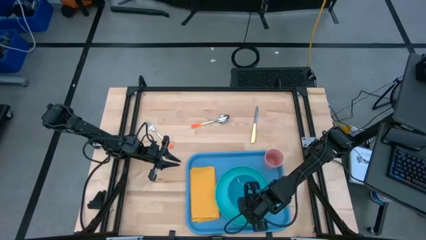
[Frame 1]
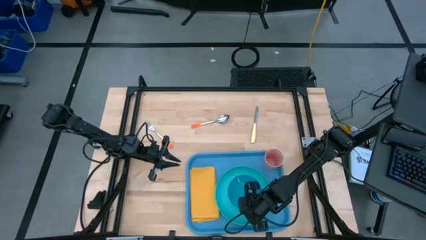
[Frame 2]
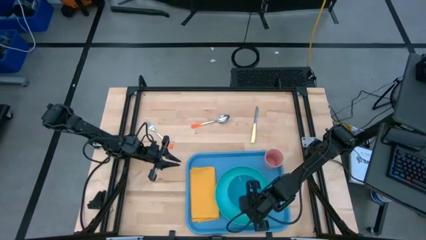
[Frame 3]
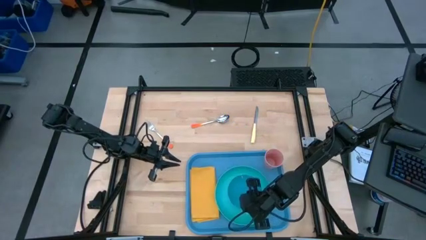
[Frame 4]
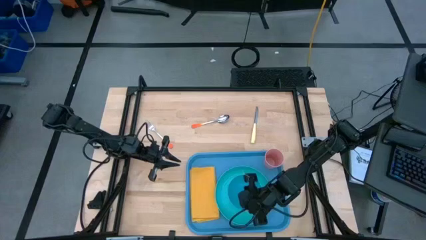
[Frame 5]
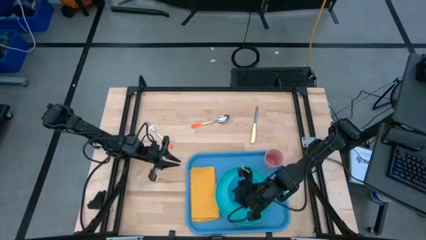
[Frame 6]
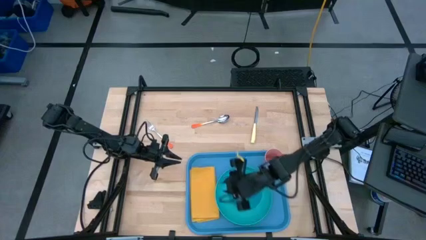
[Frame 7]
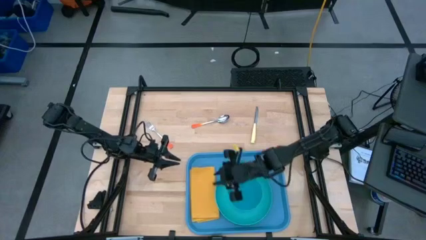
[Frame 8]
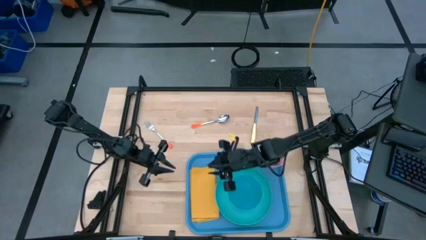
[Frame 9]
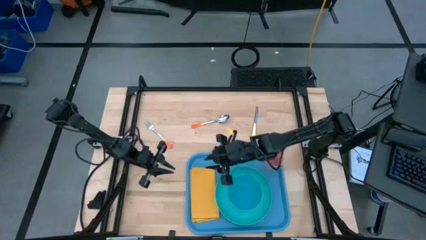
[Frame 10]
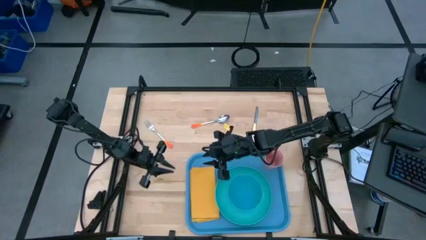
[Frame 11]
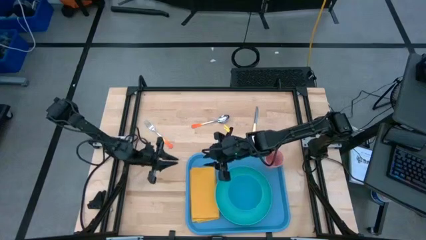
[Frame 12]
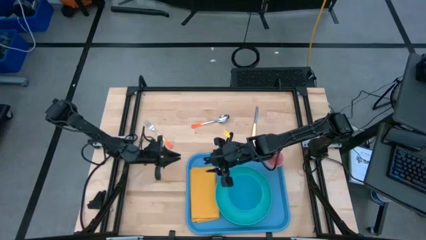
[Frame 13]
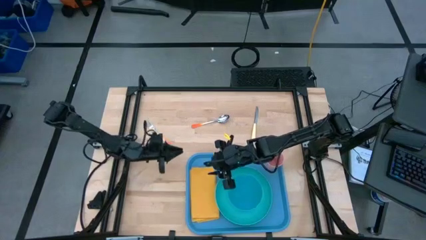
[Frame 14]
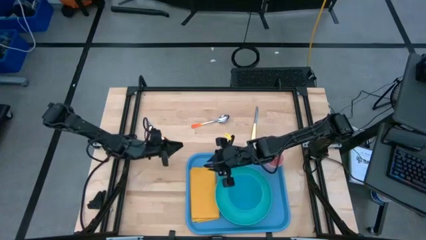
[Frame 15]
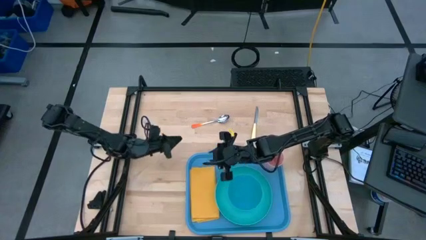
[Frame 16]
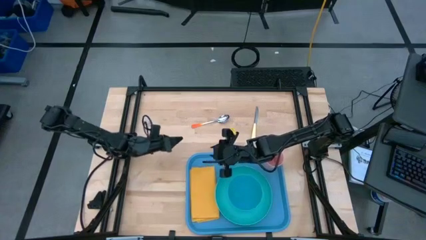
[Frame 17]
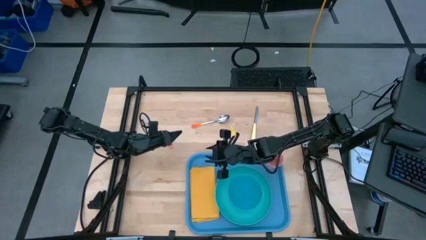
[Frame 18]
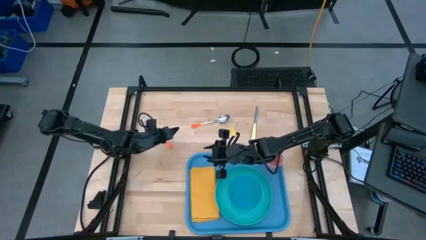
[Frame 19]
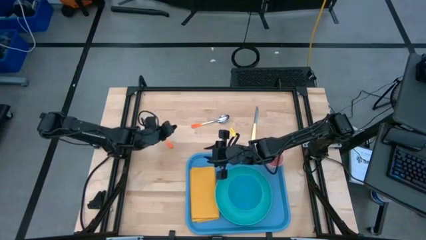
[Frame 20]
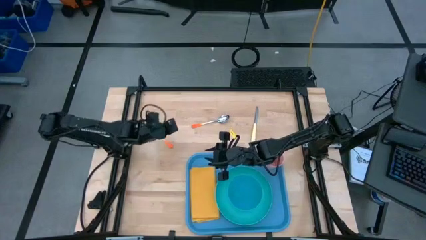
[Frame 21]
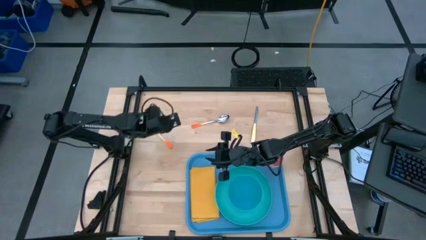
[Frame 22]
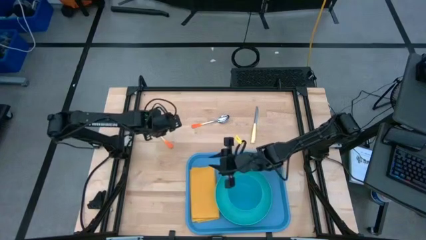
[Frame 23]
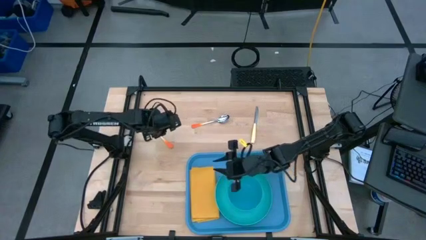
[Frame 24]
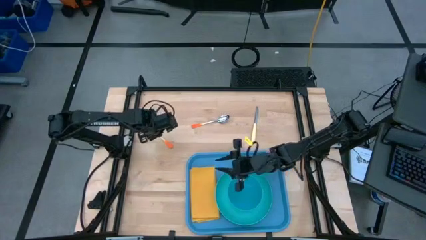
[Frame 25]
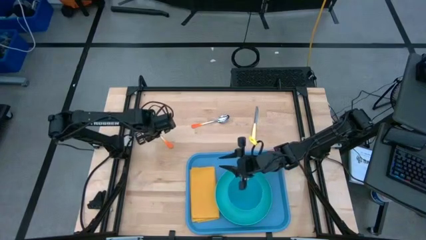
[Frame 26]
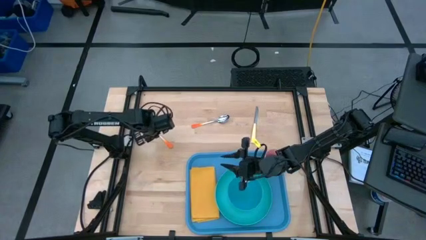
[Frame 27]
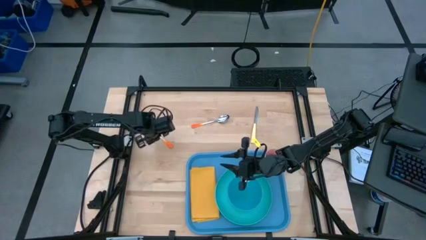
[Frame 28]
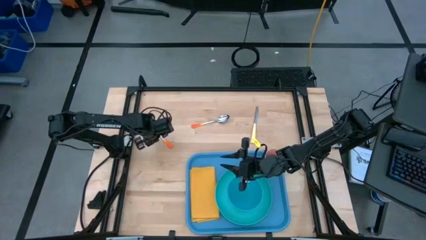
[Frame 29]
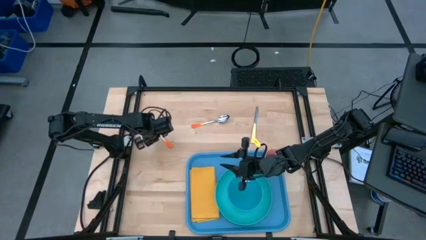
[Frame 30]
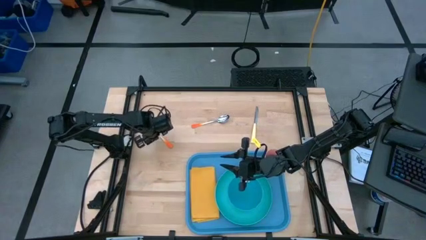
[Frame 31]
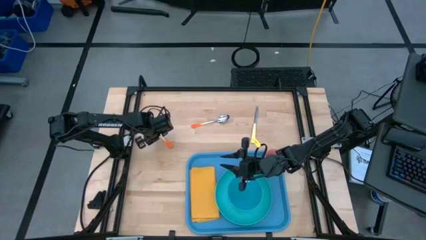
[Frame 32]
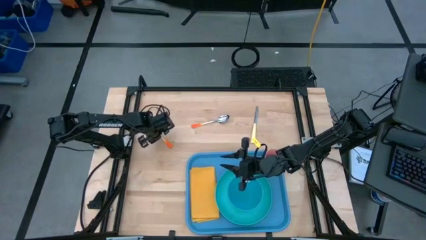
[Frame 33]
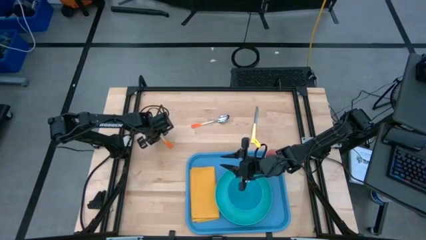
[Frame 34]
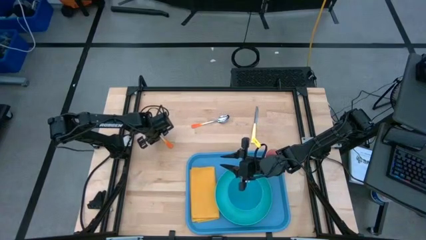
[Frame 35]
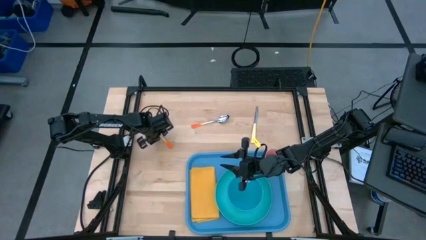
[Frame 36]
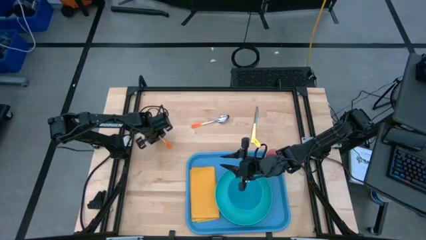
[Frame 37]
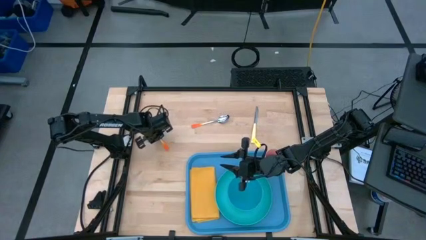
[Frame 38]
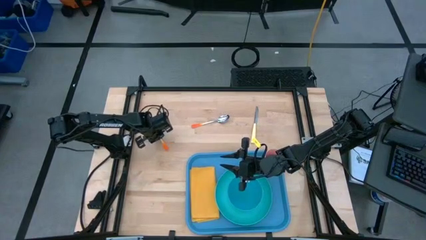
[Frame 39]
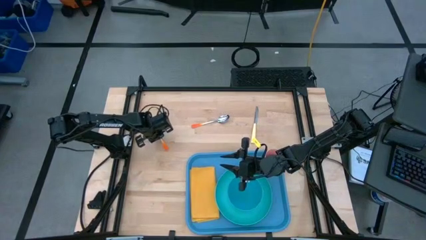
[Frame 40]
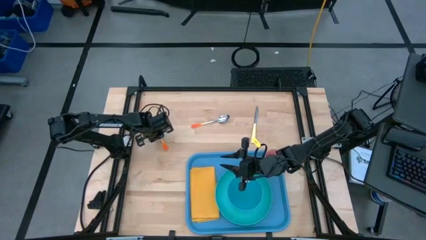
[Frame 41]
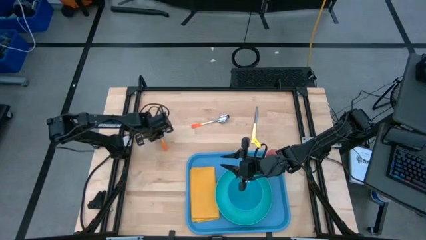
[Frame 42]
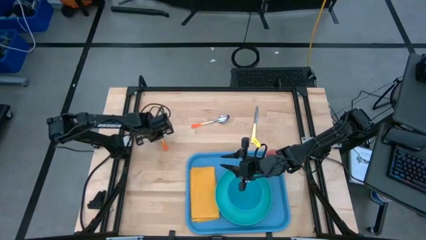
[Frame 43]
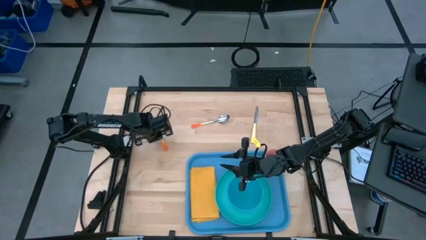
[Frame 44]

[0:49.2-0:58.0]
Task: Set up tray
Put the orange fork on the orange table napkin

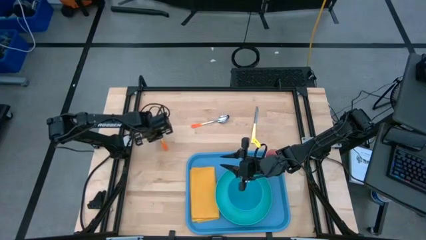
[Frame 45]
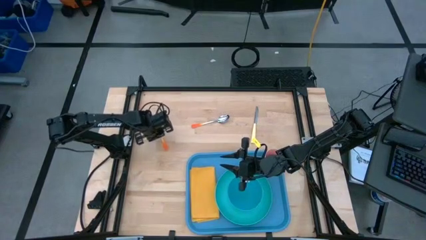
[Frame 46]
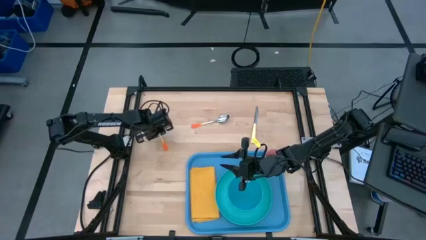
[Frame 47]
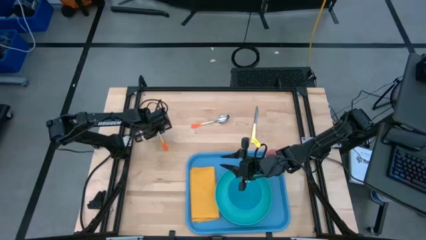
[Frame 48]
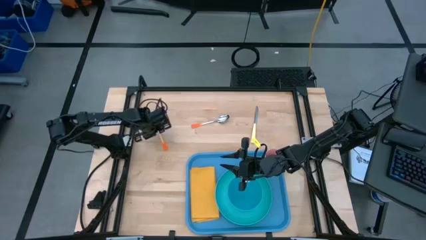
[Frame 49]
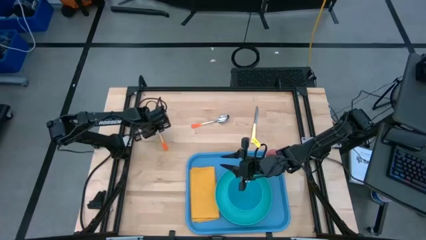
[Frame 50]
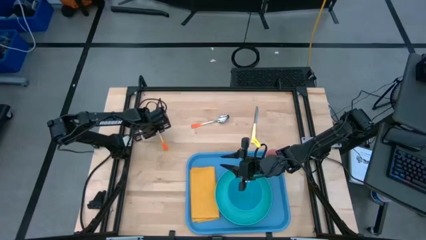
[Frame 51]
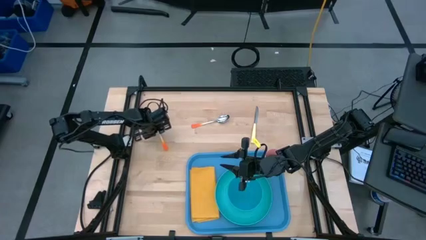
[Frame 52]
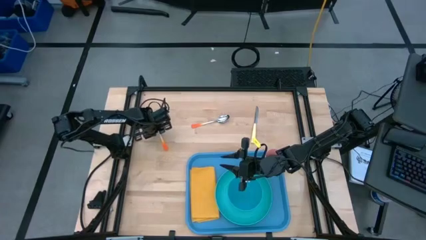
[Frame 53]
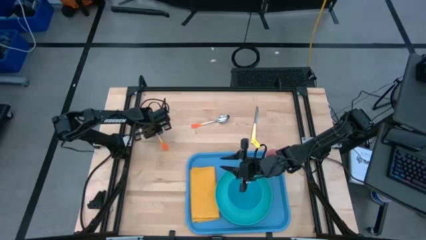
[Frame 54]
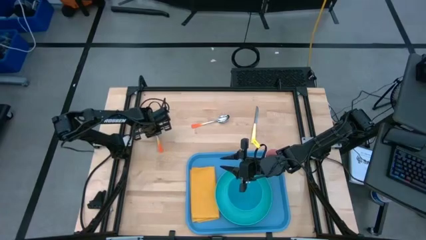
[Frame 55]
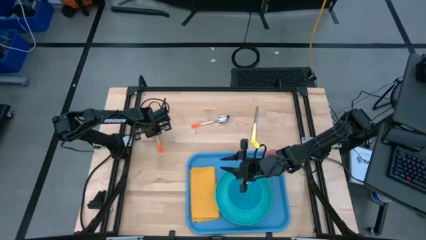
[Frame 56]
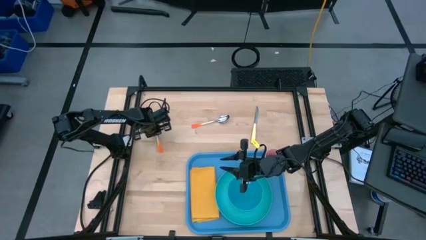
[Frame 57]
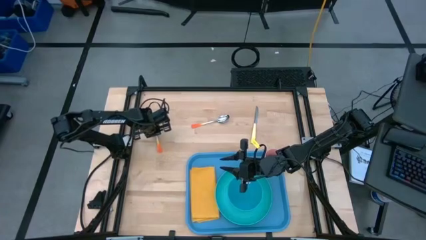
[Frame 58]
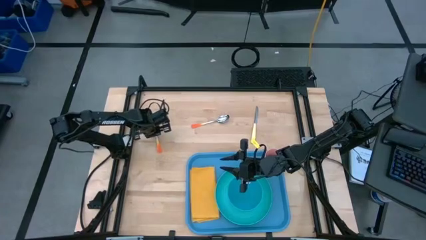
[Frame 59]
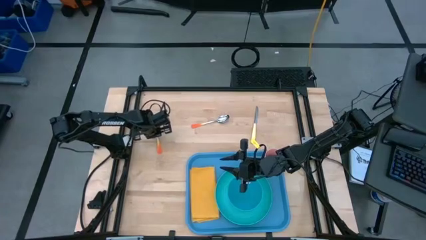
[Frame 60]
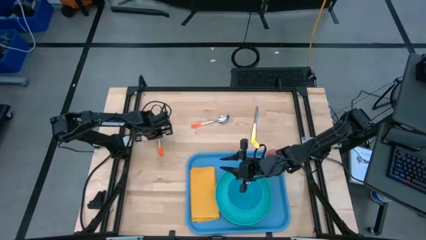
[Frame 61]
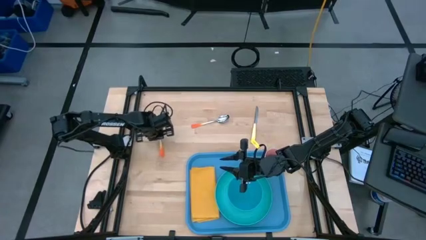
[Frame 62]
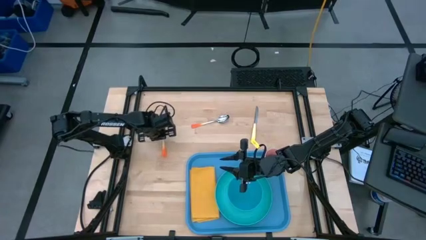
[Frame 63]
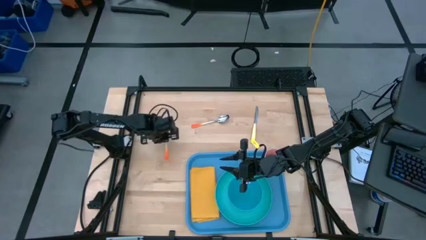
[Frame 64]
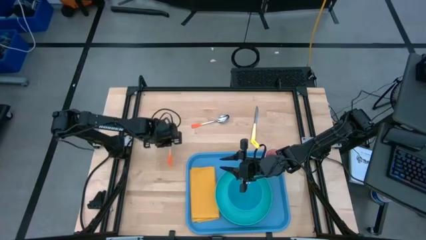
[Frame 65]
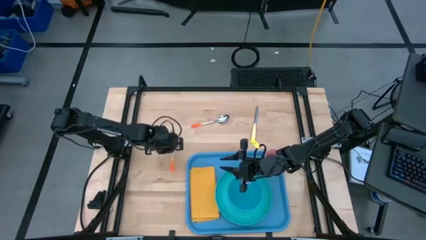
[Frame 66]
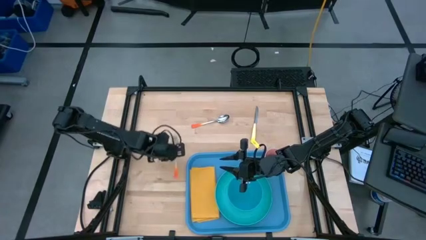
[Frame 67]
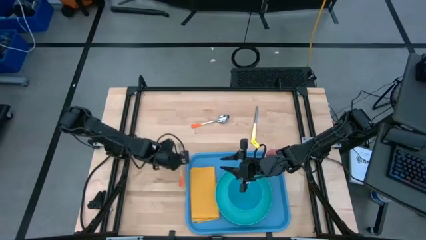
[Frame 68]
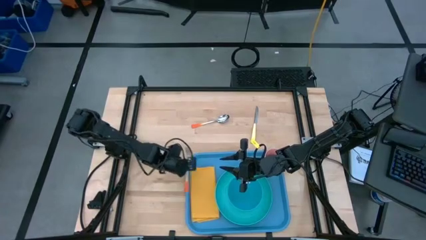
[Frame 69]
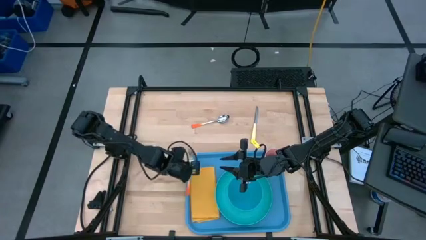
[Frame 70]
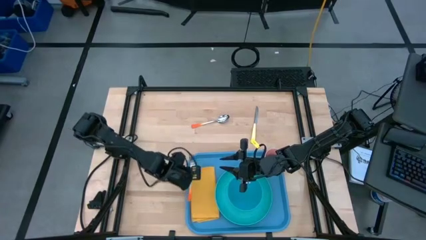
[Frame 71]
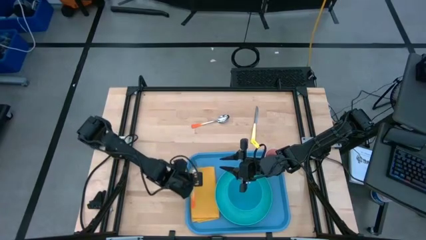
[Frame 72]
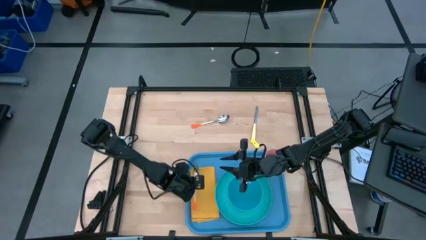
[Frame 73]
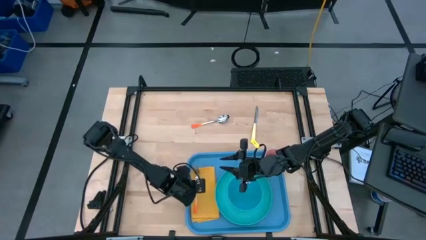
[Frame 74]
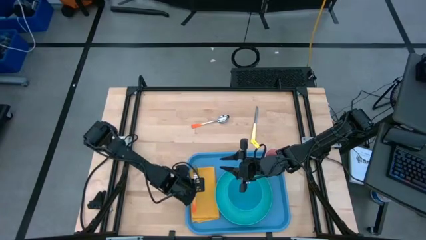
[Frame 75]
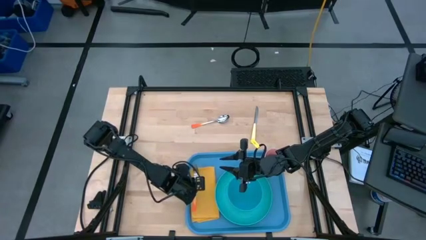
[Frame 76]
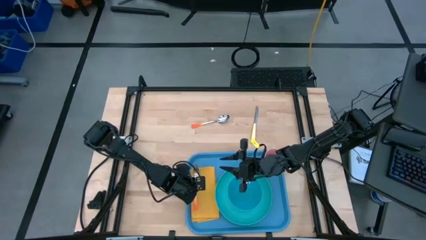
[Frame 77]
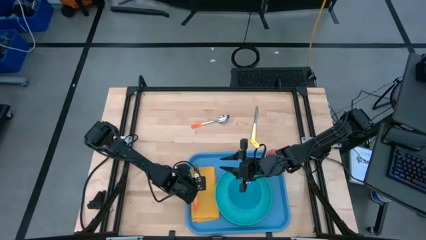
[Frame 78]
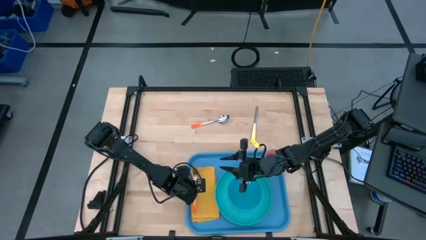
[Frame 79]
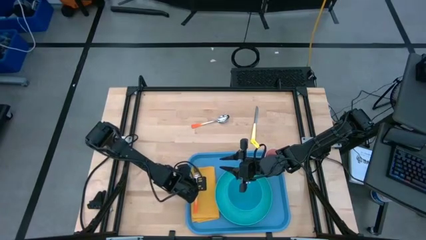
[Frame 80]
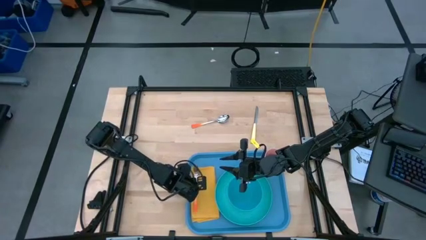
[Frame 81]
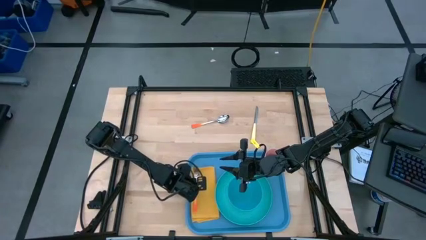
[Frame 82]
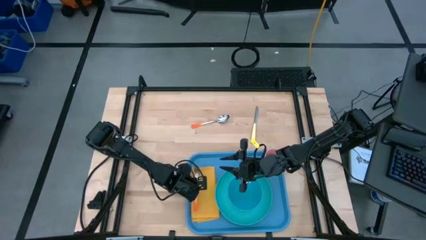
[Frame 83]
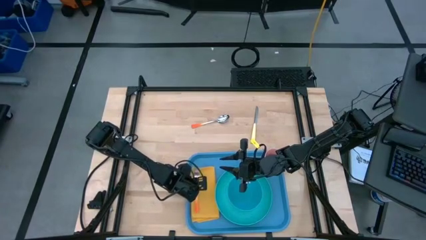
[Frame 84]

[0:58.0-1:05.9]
Put the orange fork on the orange table napkin

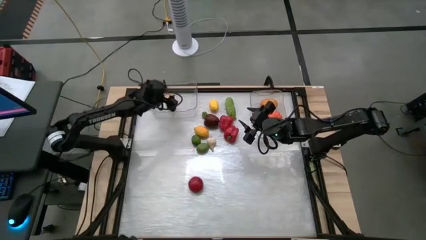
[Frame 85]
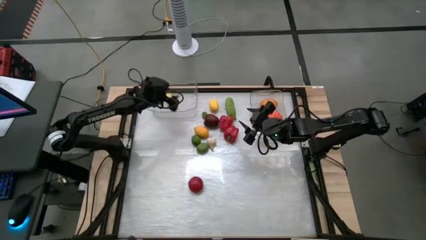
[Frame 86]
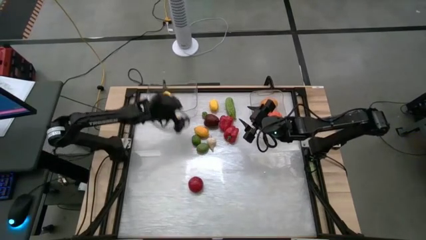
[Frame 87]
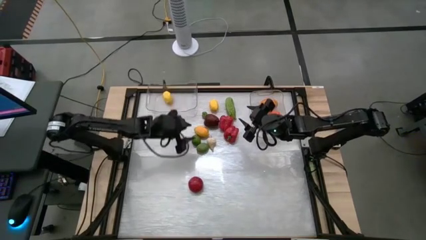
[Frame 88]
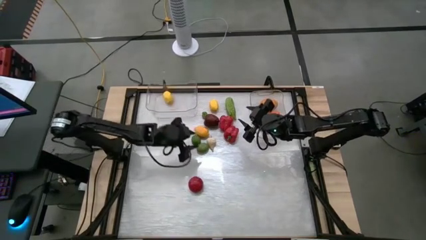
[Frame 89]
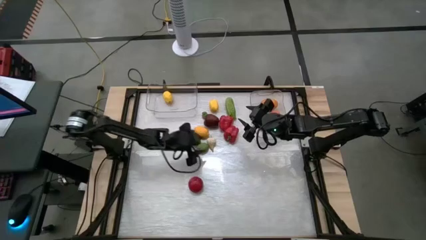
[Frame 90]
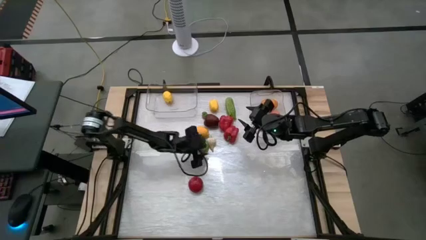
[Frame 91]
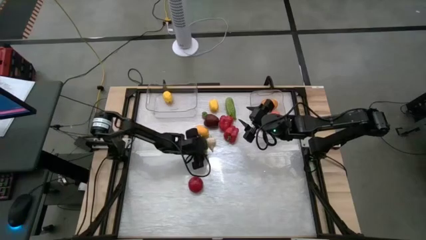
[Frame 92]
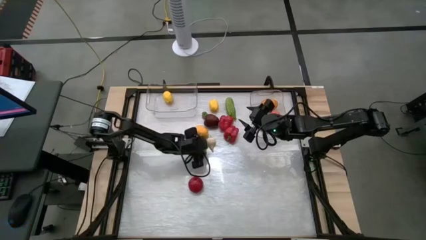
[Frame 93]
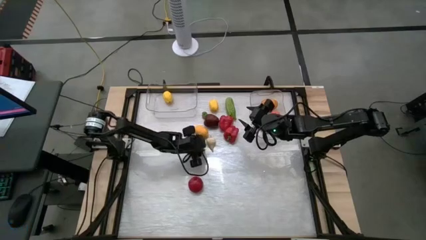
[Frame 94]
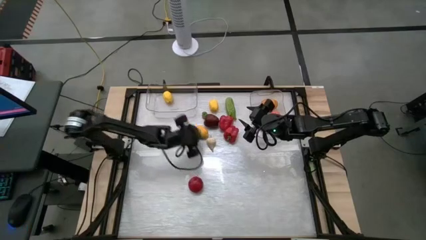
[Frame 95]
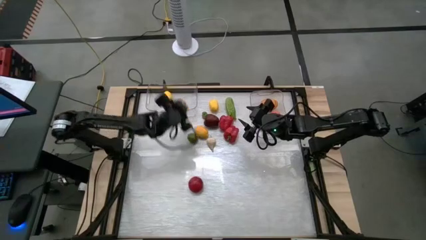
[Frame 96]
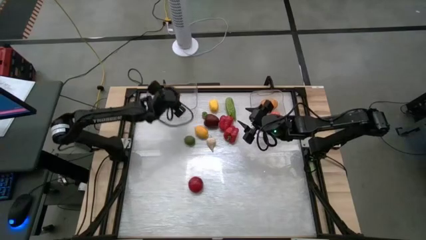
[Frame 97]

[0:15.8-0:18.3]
Task: Sort produce into baskets
Put the bottom green lime into the left transparent bin
